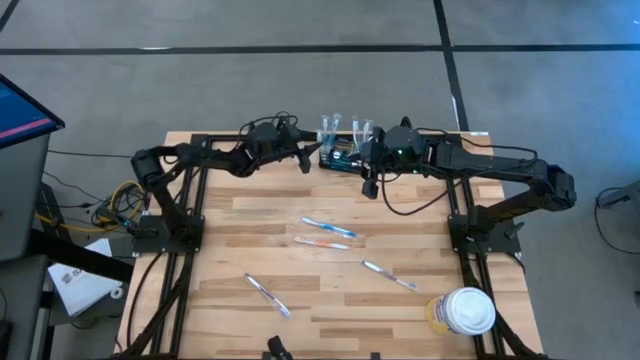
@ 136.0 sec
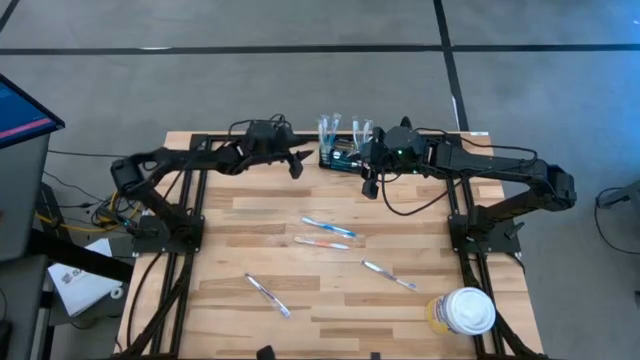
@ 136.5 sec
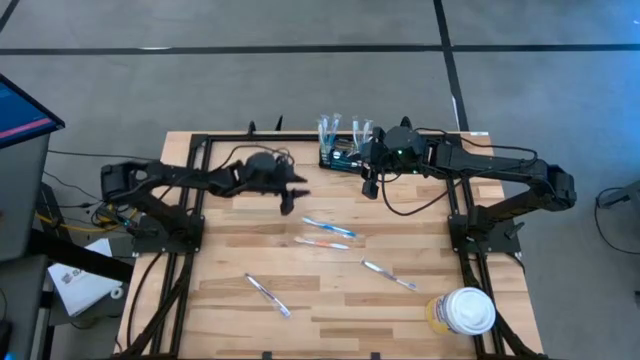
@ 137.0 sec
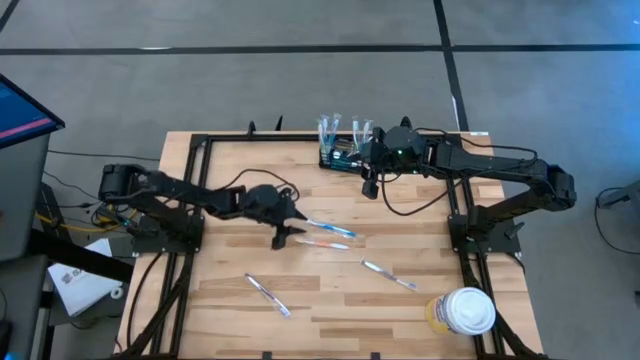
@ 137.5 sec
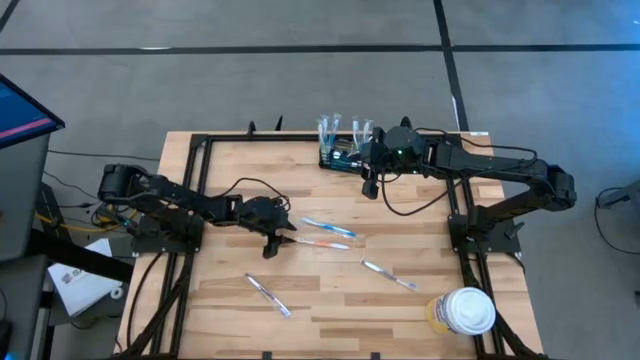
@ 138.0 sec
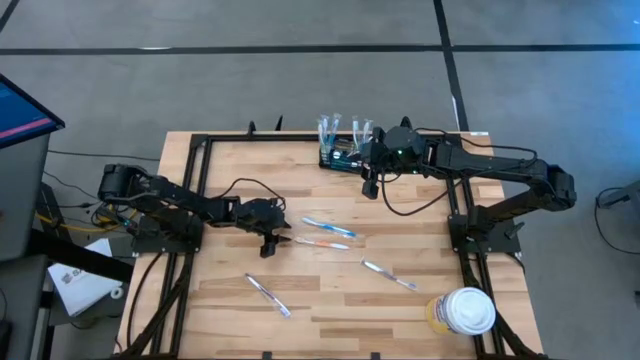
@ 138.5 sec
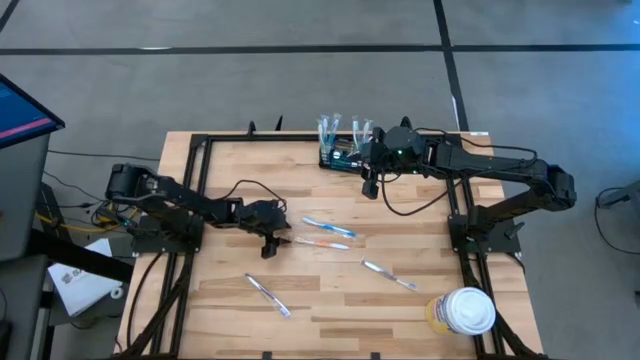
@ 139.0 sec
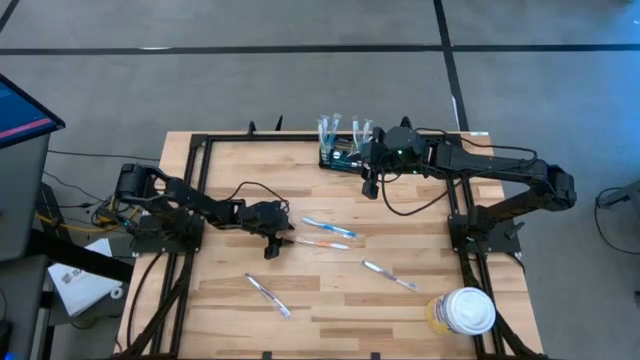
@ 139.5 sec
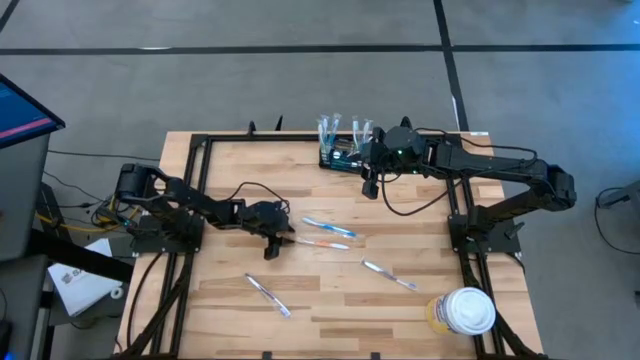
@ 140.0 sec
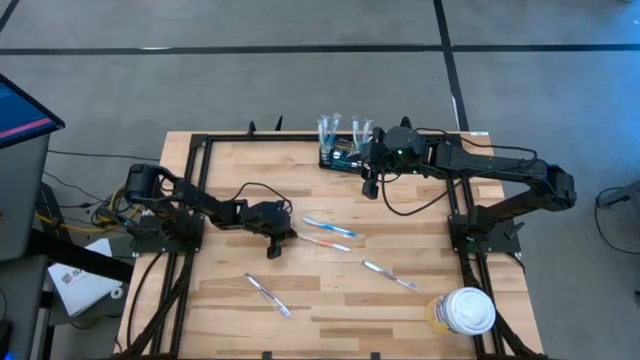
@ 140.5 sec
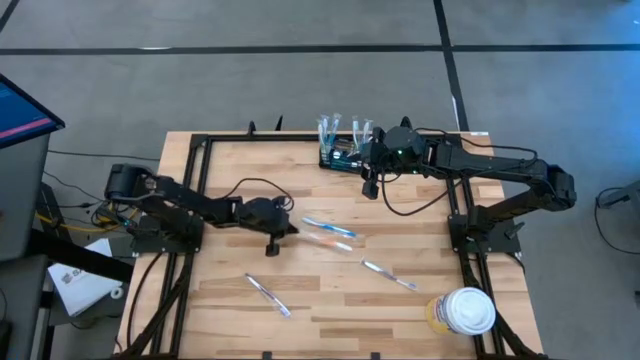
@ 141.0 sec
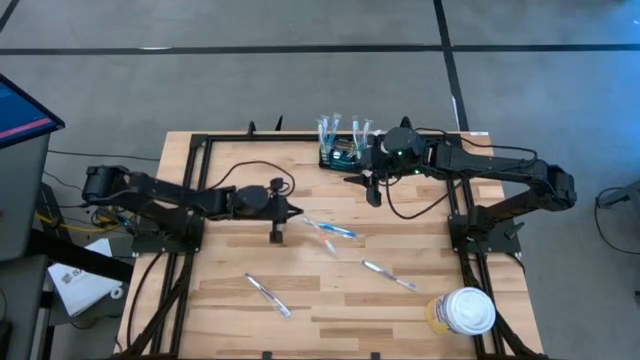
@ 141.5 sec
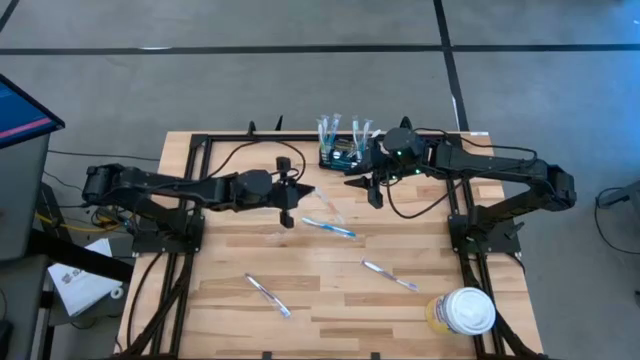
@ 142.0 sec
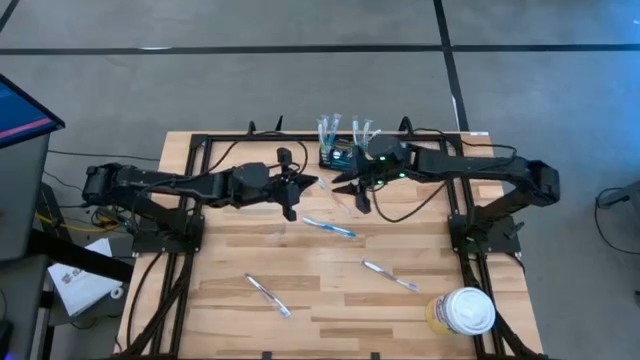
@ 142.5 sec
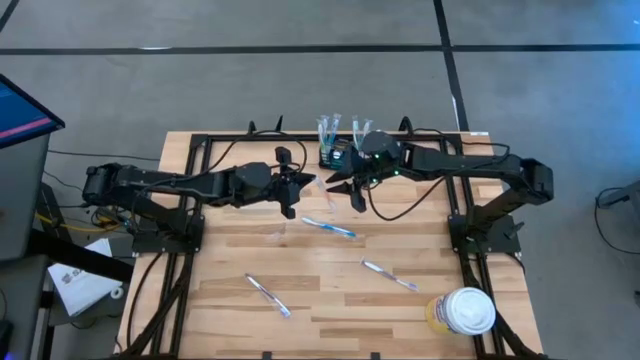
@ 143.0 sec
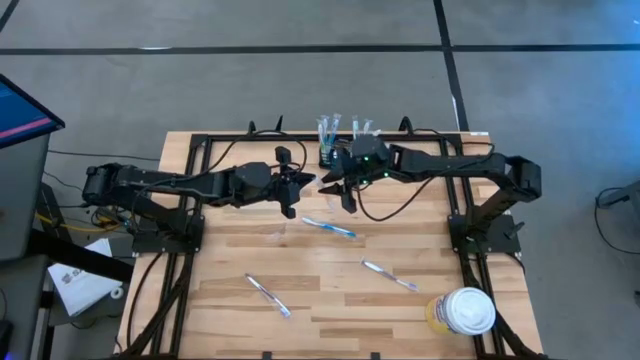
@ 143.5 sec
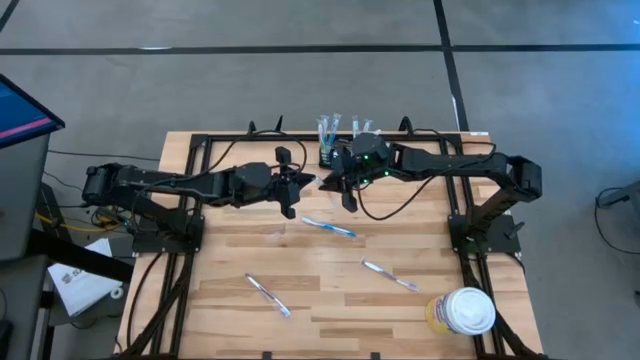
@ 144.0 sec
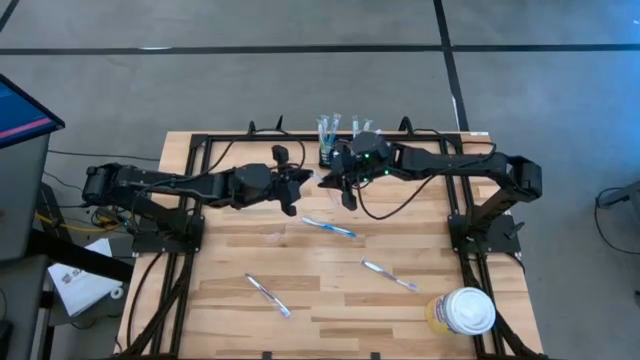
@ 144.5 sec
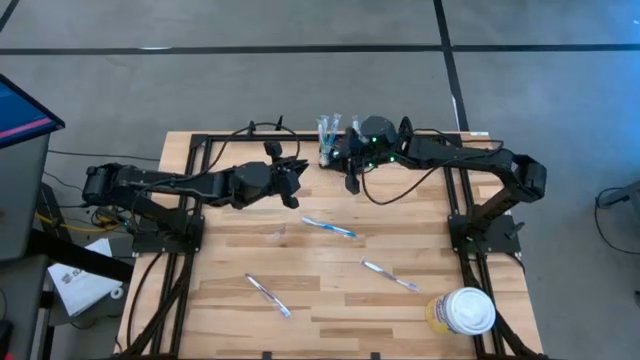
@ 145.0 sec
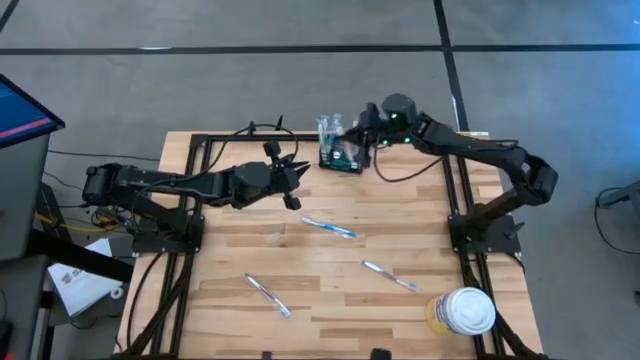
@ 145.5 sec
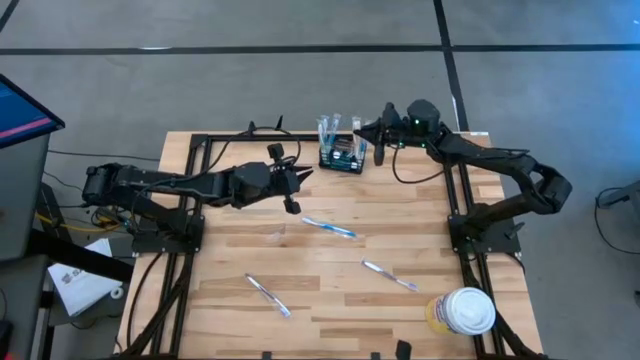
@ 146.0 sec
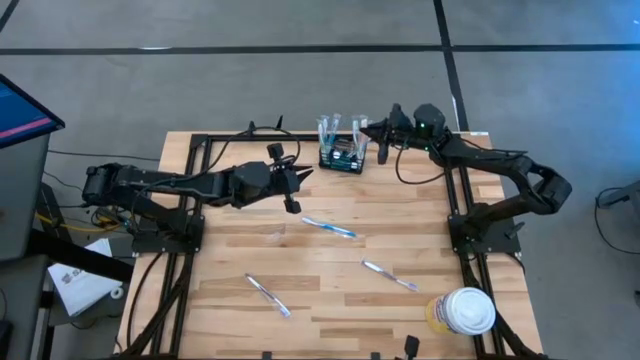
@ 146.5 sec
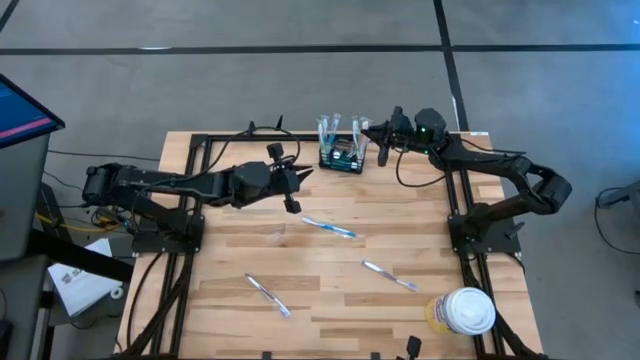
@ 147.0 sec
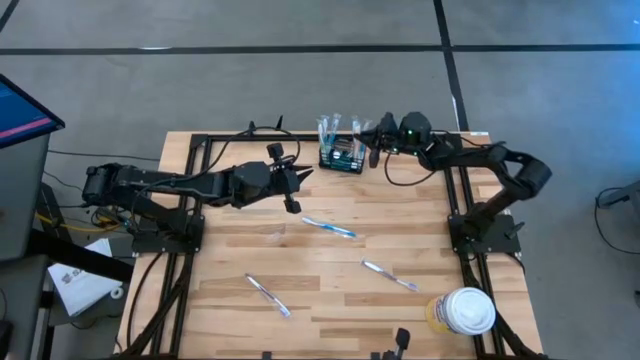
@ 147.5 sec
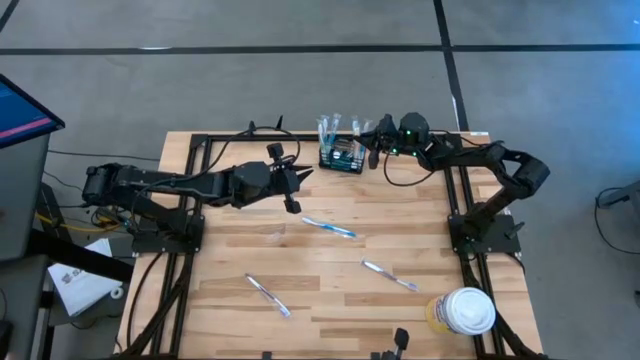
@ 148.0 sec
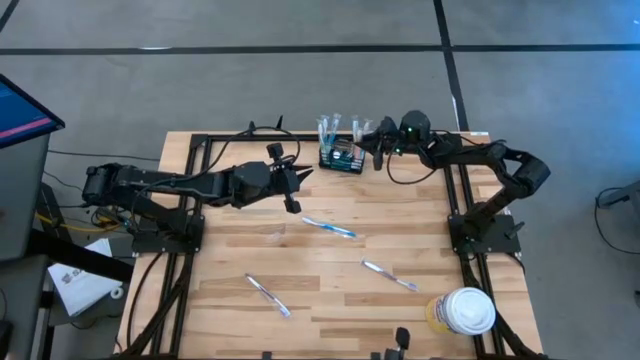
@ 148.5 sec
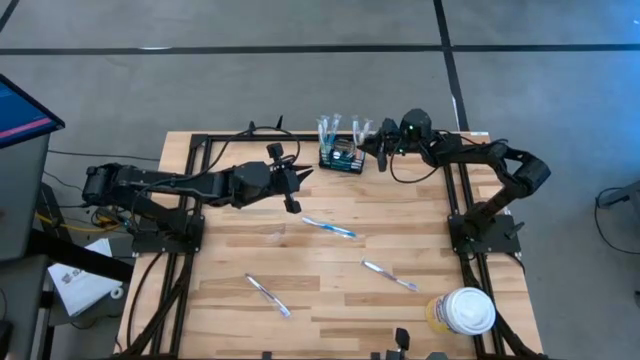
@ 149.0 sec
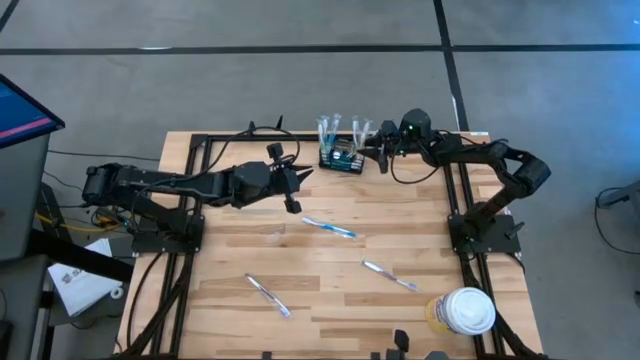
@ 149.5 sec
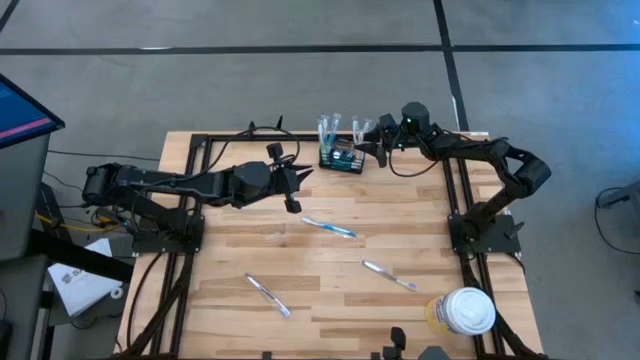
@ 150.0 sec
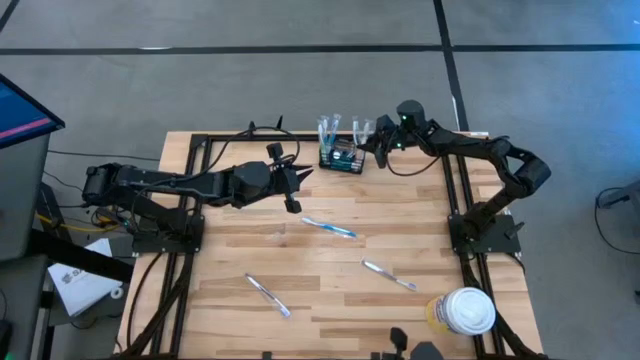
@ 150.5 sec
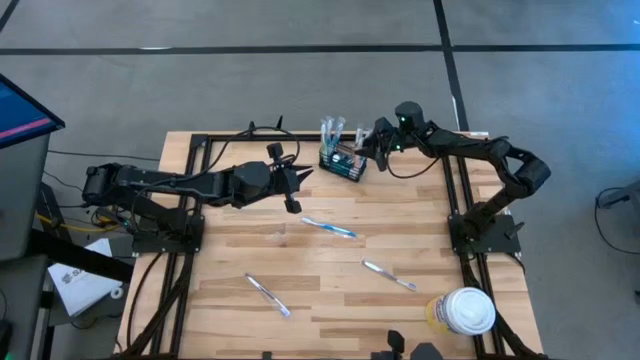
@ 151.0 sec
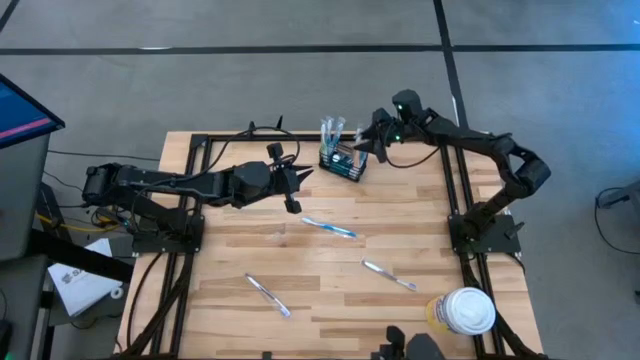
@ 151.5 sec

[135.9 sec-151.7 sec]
Task: Pick & Place toothbrushing station
Put the orange toothbrush into the mesh organizer
